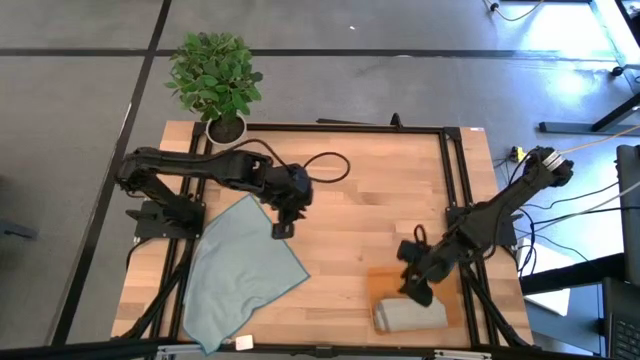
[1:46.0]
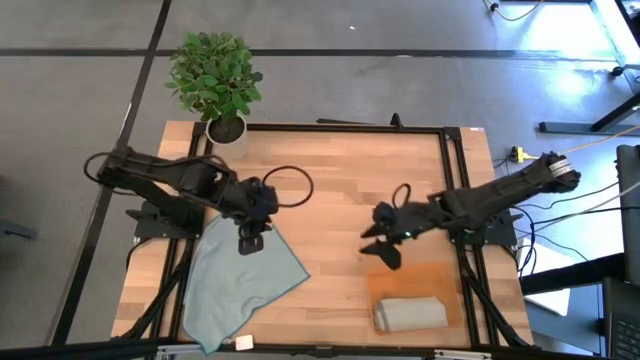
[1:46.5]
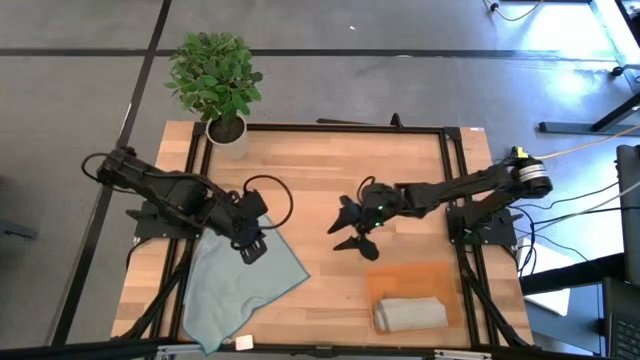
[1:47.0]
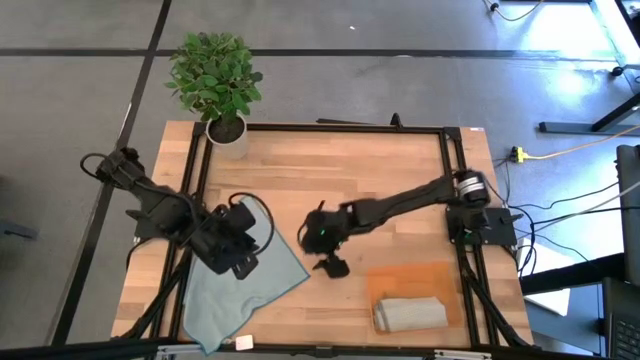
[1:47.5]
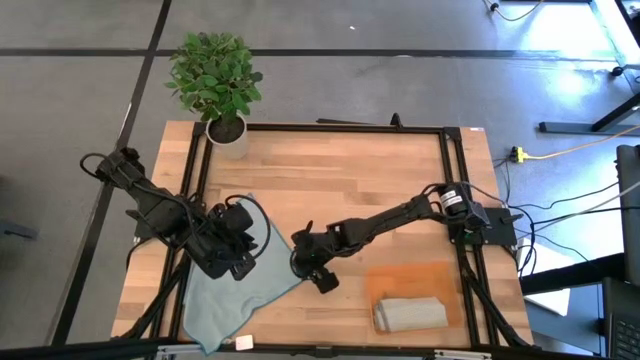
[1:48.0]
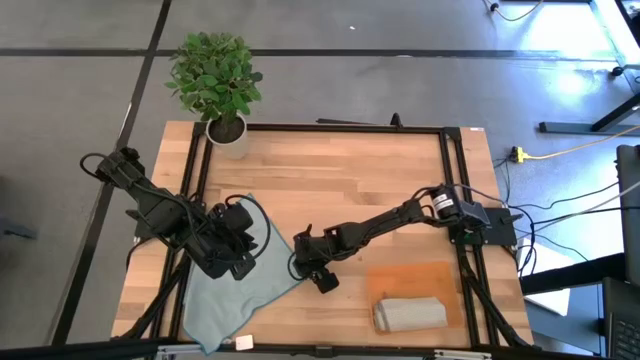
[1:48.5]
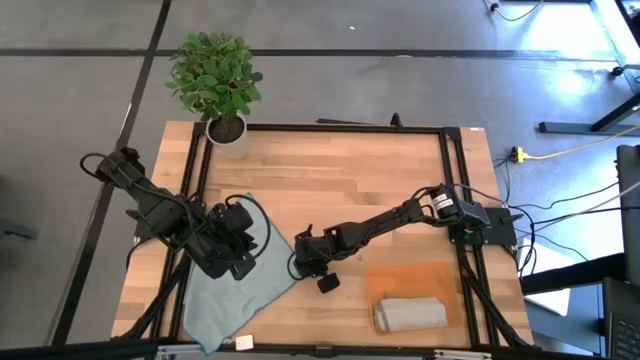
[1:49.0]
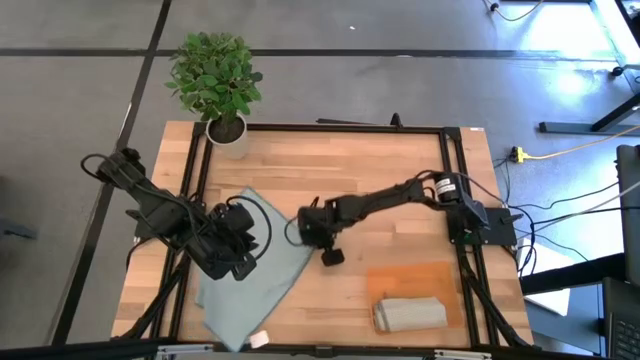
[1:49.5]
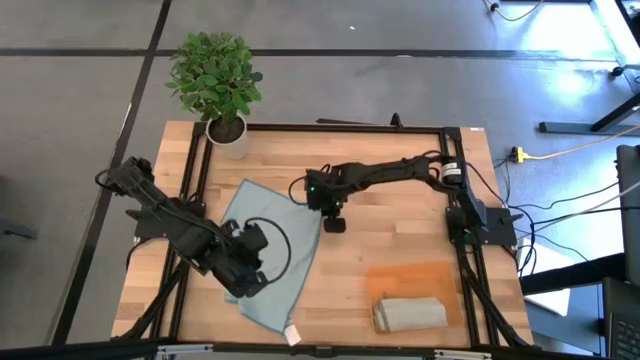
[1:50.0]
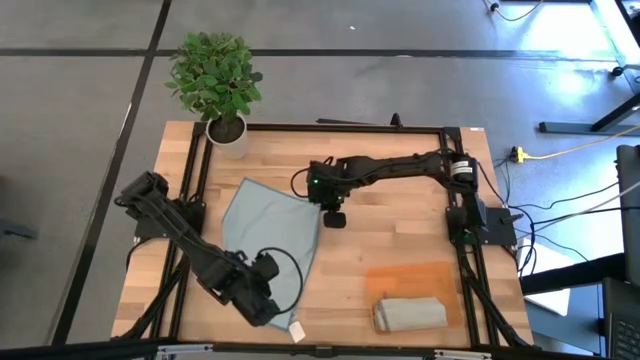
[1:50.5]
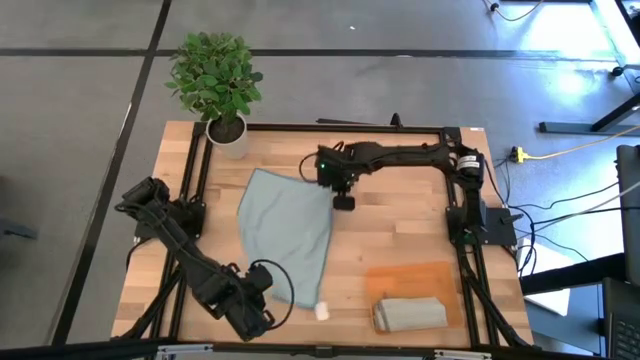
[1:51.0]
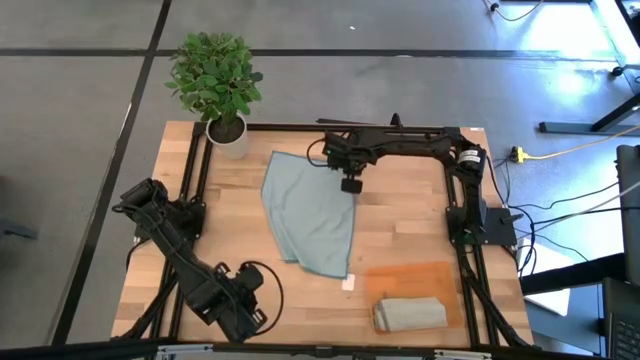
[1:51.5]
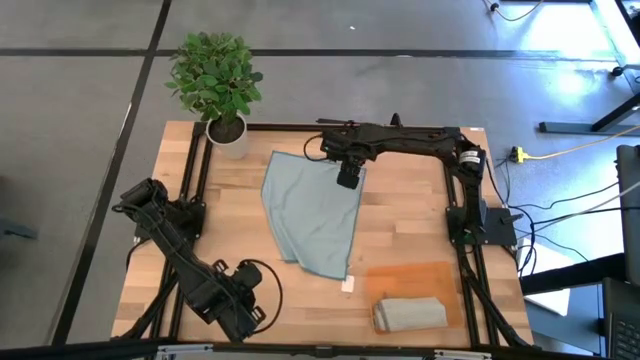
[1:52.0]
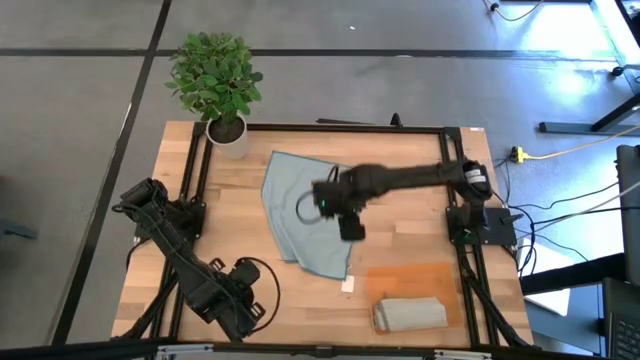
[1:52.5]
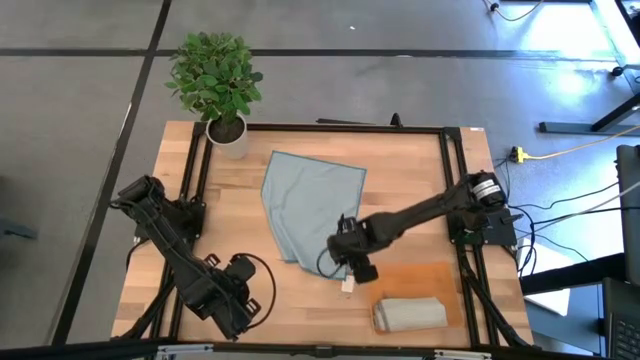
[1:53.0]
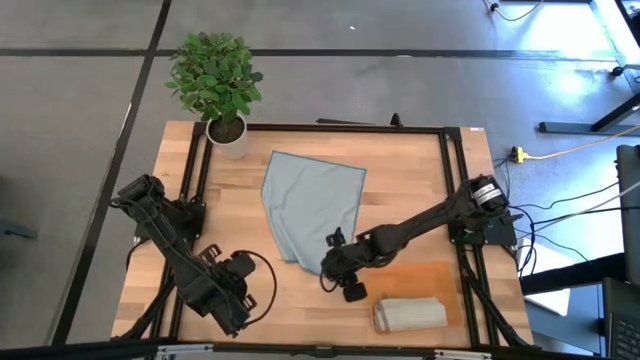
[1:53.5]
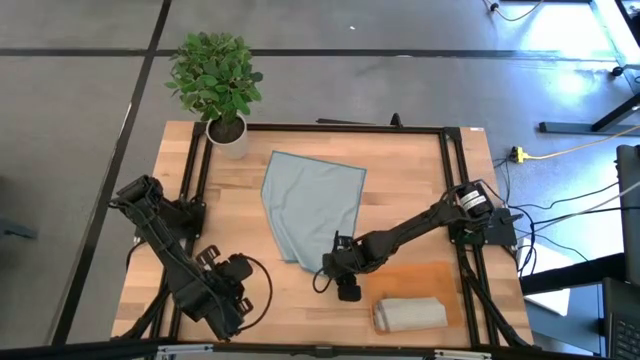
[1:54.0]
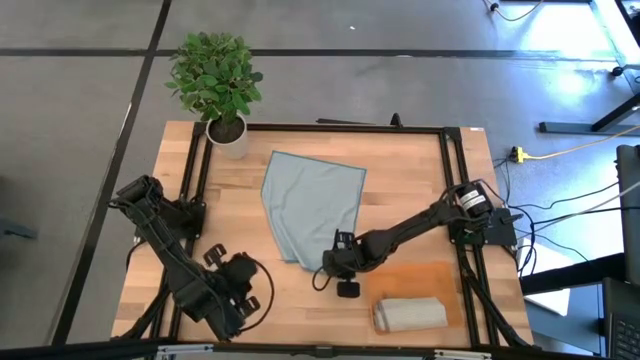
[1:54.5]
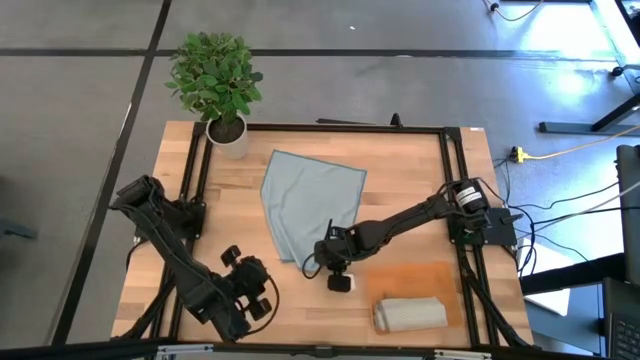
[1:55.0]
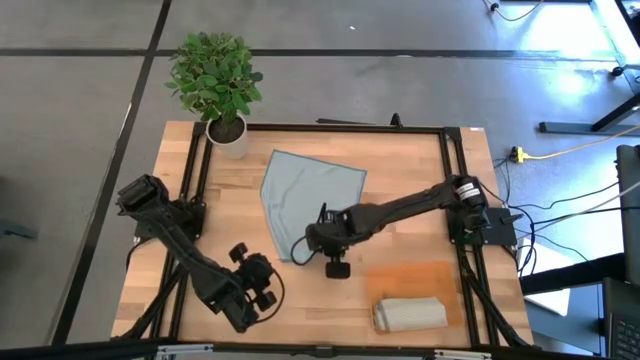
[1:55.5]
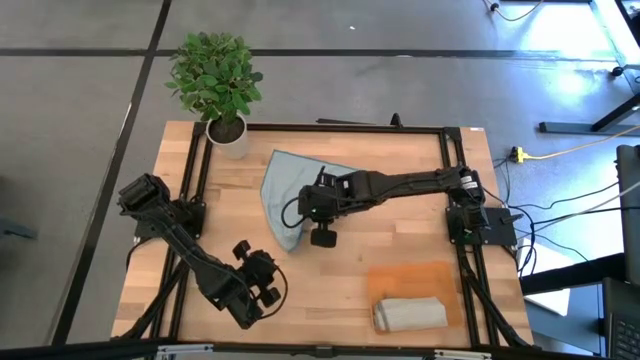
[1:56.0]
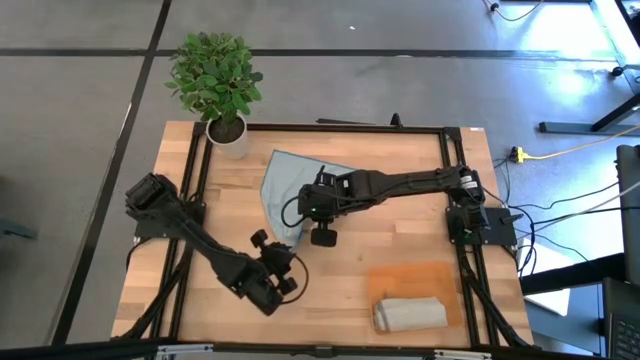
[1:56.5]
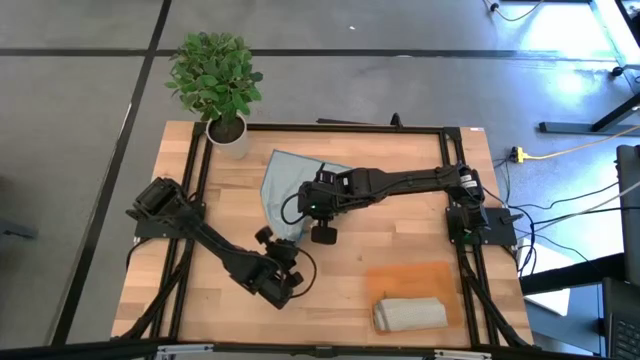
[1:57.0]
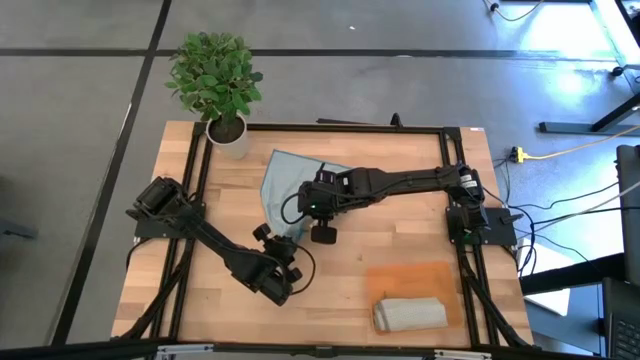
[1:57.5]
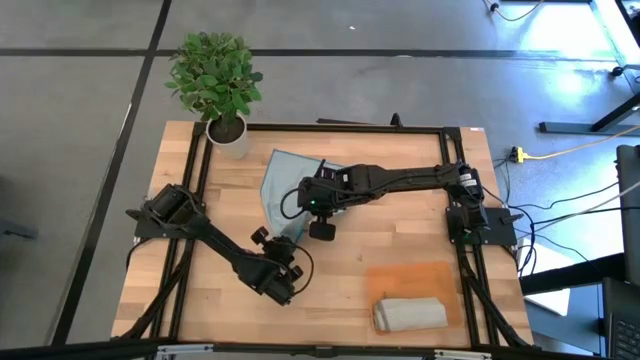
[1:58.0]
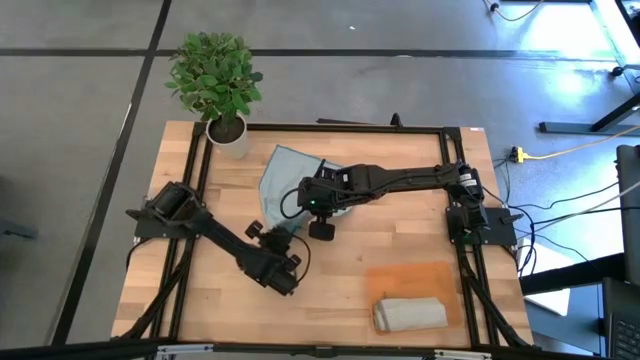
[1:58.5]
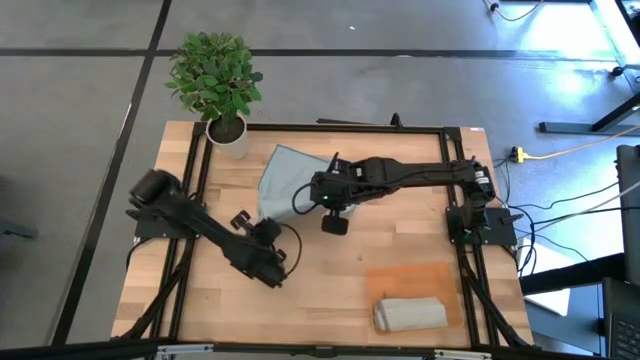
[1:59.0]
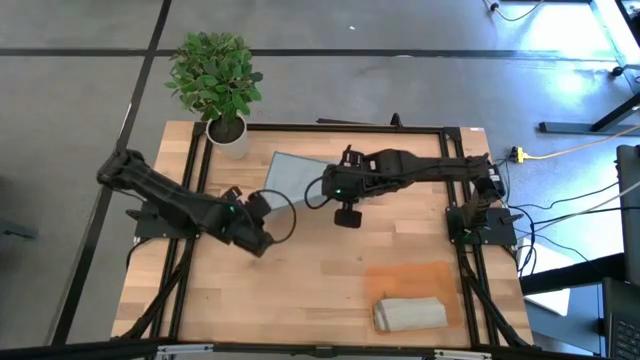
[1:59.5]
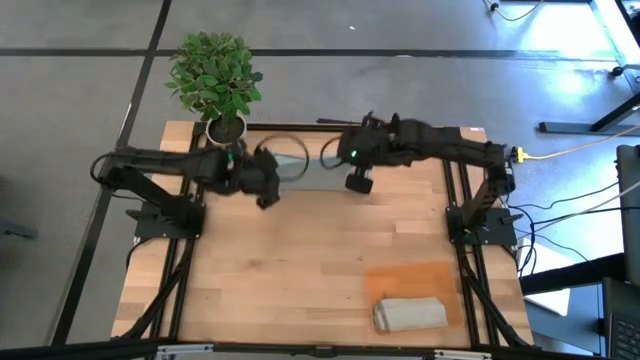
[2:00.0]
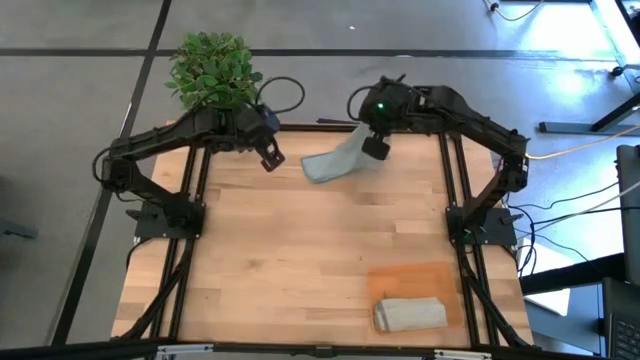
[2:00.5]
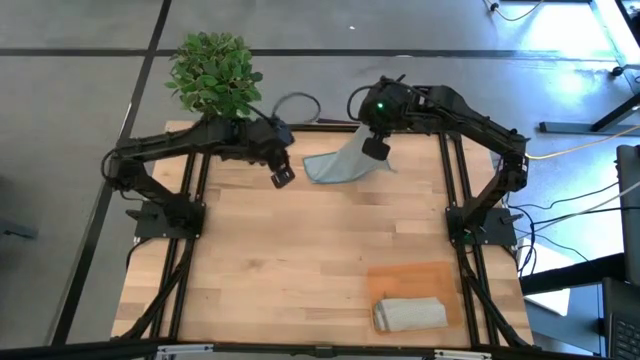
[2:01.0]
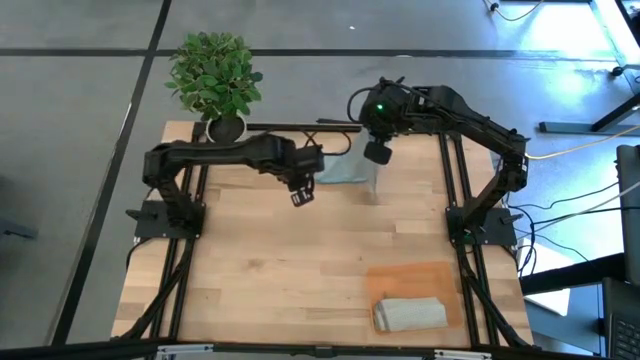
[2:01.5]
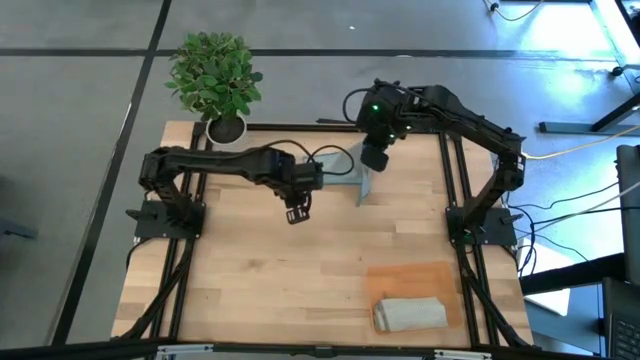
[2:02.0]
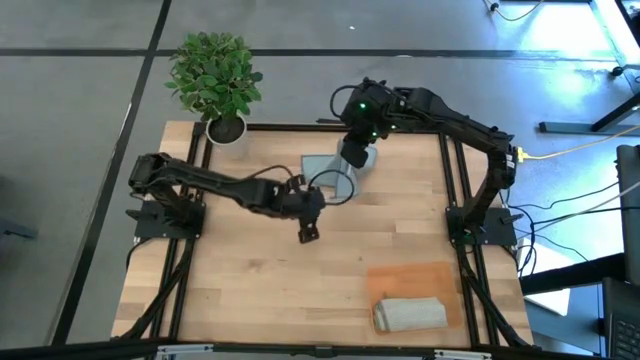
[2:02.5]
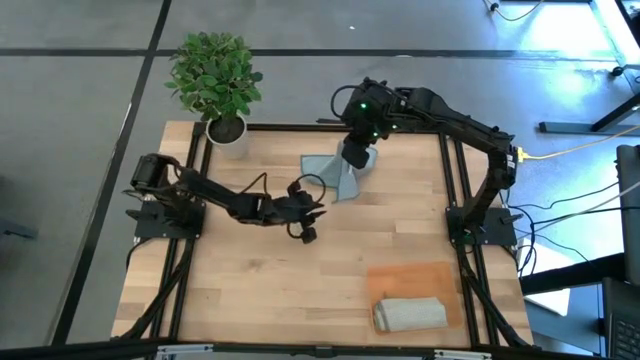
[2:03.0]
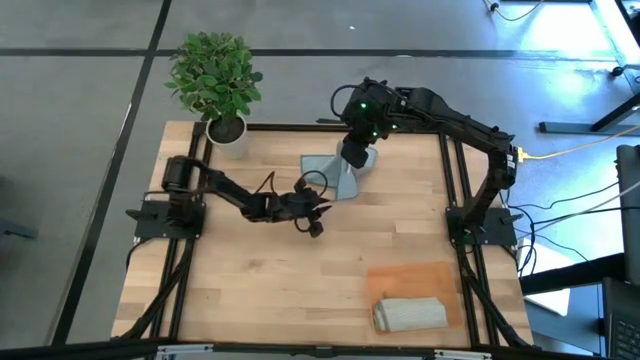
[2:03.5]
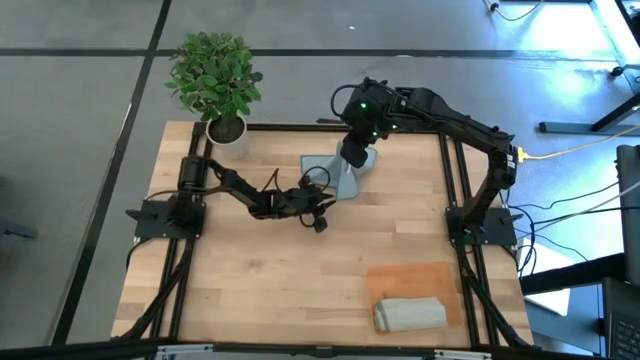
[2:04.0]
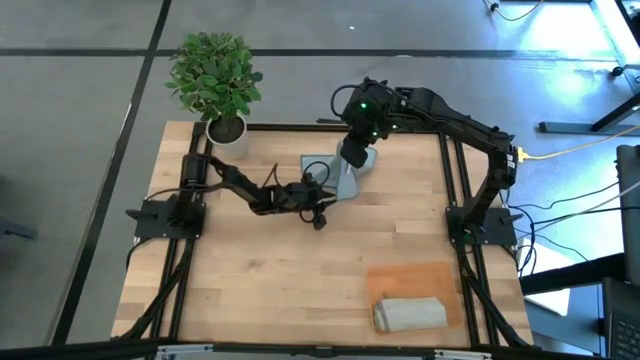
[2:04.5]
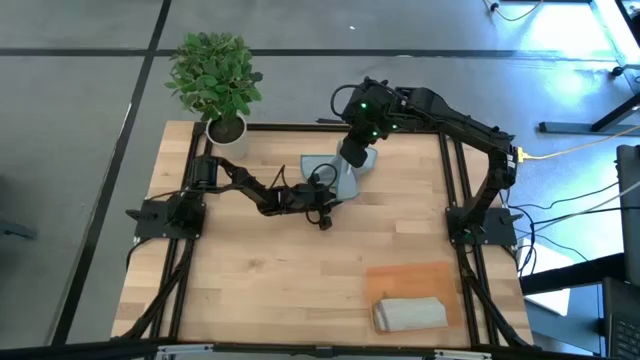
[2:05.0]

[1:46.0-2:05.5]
Task: Roll microfiber towels into tight, uniform cylinder then place into a basket
Roll the light blue microfiber towel

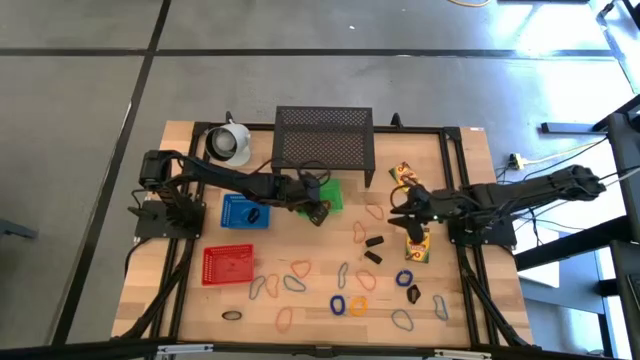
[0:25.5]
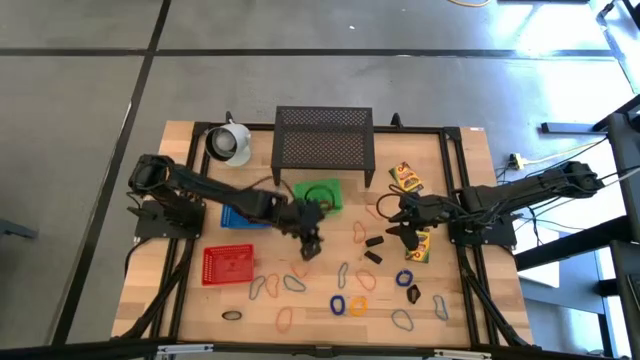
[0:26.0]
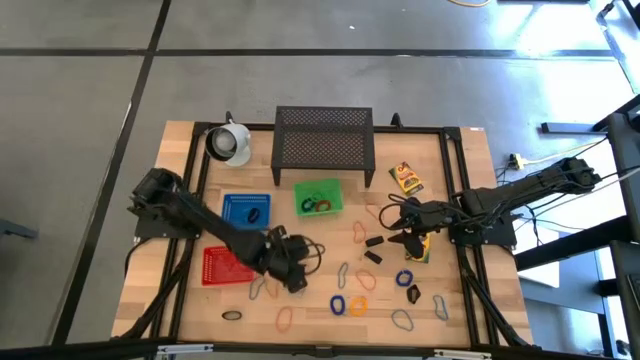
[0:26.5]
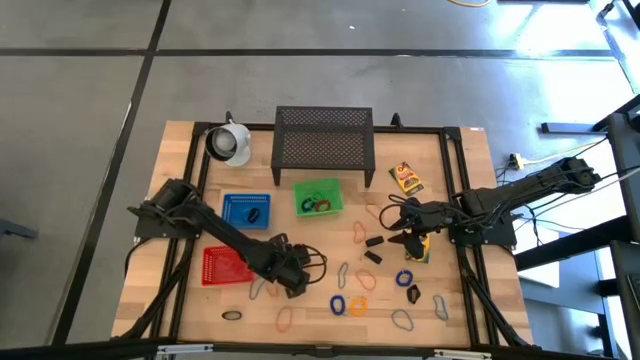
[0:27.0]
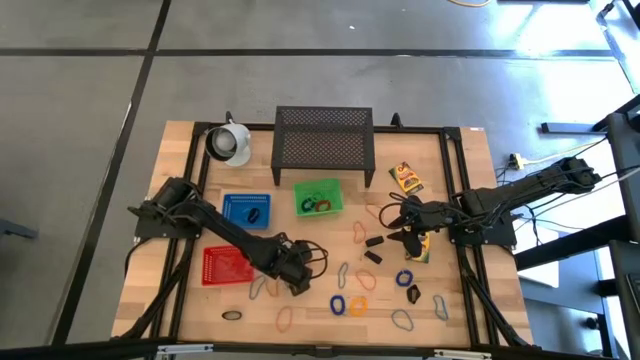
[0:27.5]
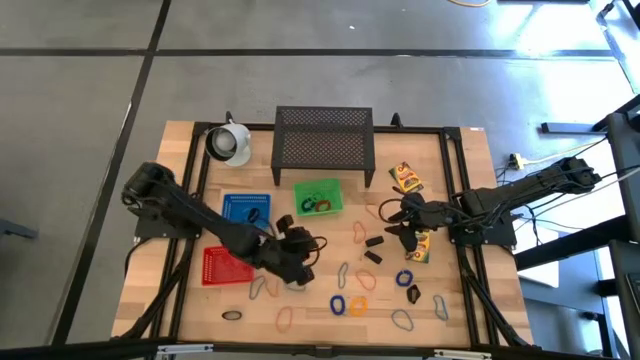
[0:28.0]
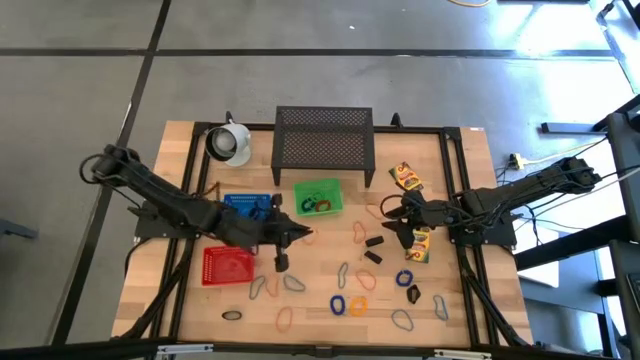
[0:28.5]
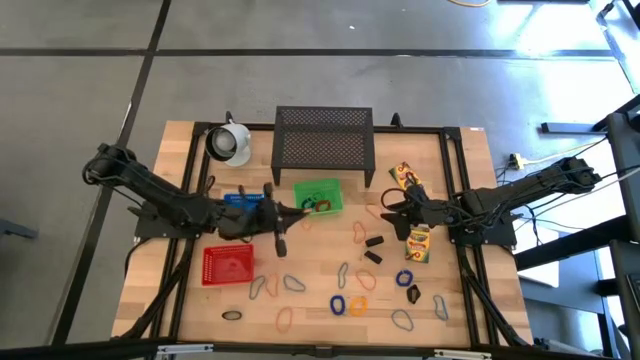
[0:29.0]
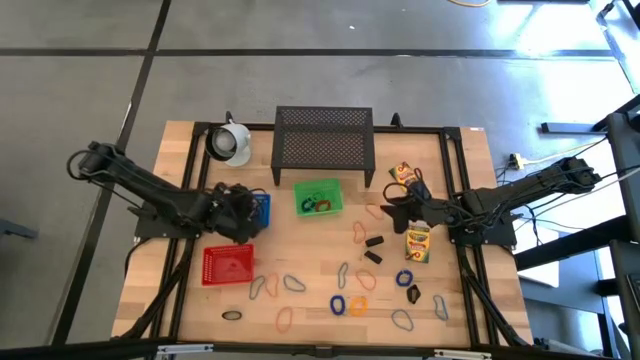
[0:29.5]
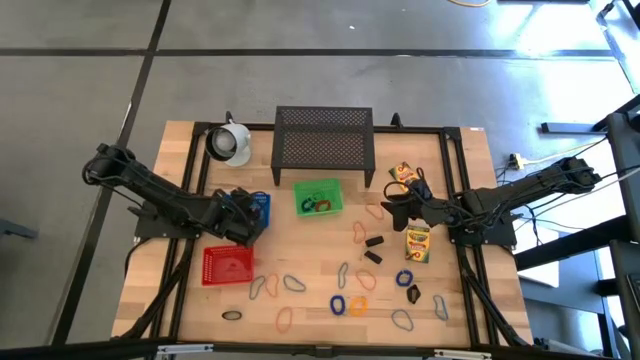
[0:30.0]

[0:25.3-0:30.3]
Task: Pick & Place Office Desk Supplies
Put the orange rubber band into the blue bin
